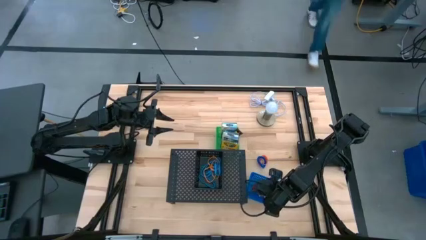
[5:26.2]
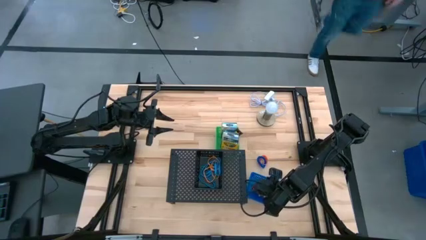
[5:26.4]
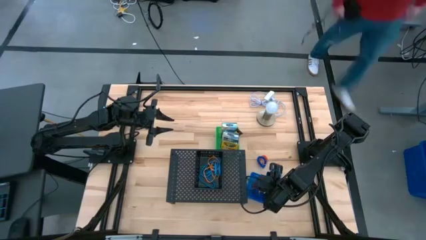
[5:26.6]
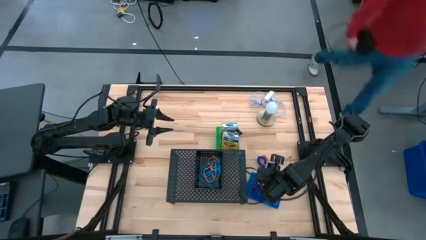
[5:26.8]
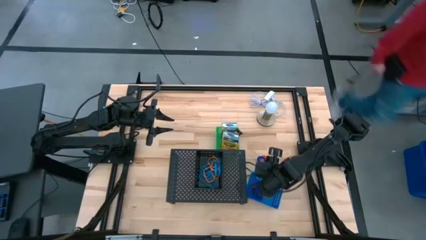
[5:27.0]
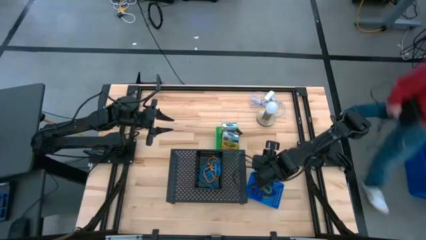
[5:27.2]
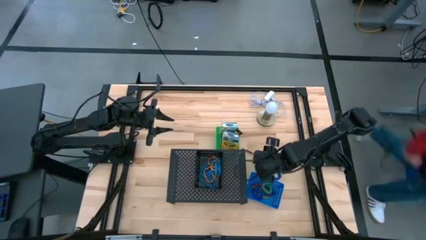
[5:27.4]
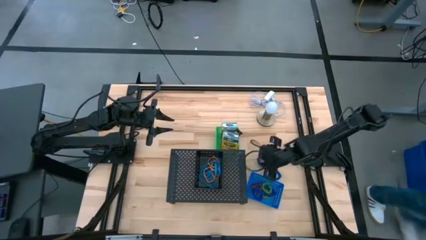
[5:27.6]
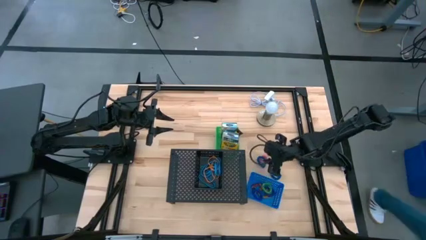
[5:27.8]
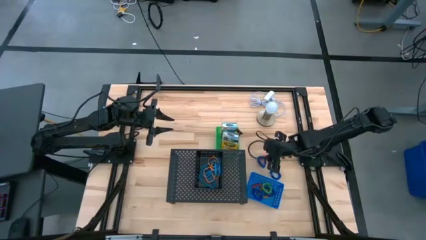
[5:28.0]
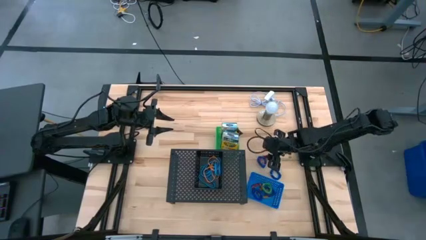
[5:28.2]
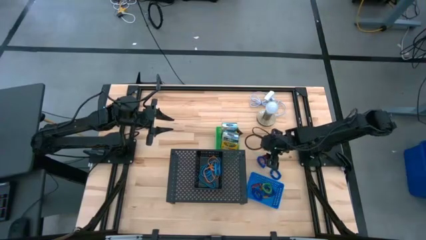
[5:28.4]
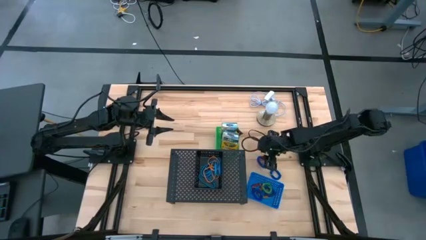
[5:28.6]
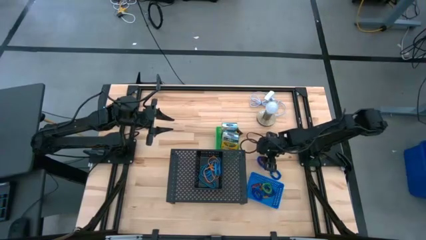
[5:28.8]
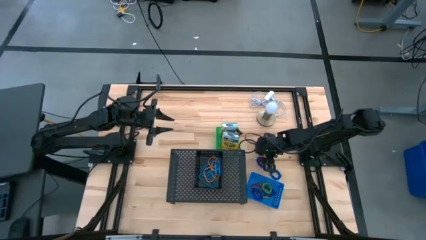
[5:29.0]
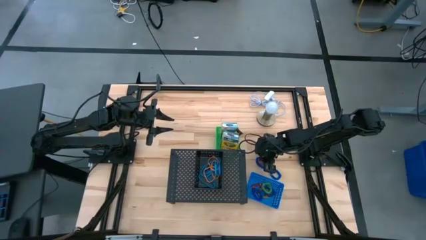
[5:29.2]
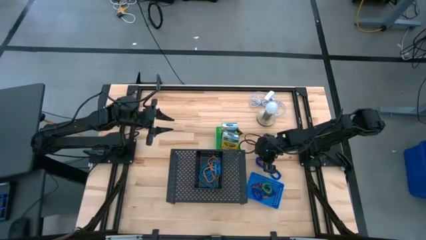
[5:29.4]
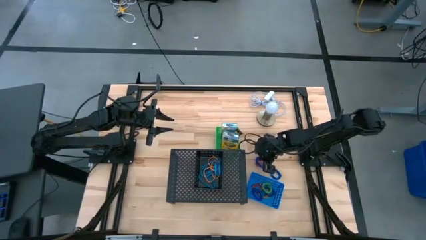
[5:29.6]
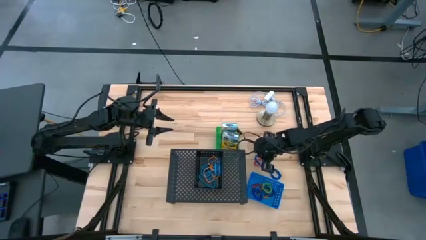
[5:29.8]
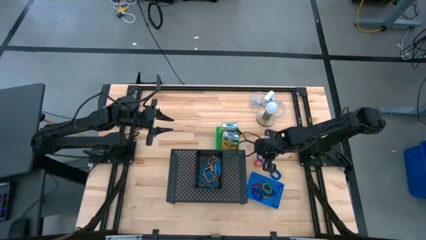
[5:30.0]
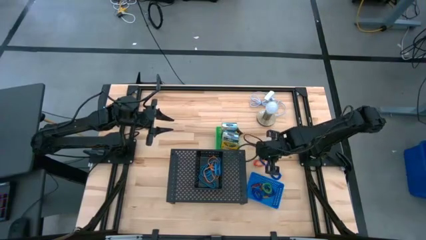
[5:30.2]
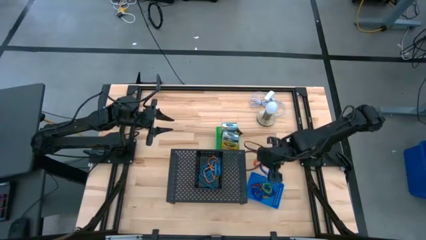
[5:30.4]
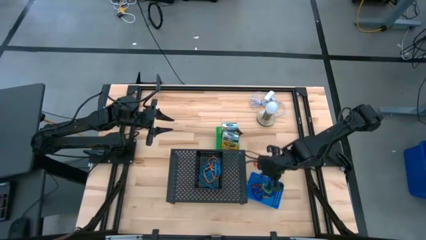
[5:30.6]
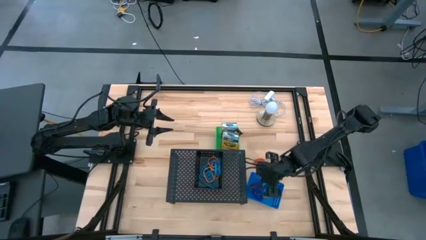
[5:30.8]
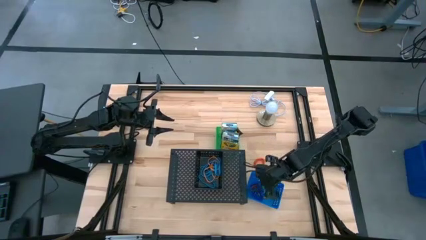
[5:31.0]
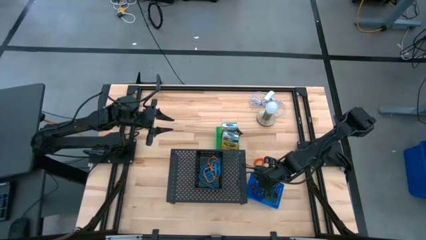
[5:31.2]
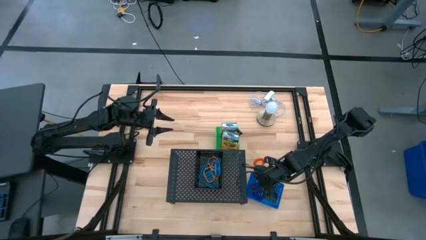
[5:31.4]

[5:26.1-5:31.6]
Task: Pick & Place Office Desk Supplies
Put the top blue spring keychain into the blue bin

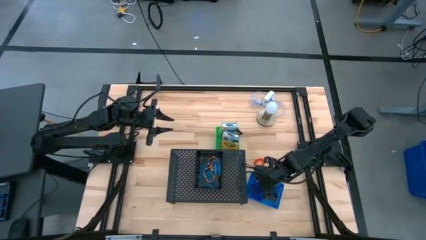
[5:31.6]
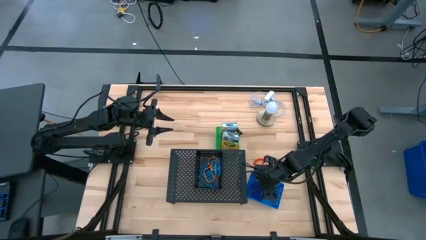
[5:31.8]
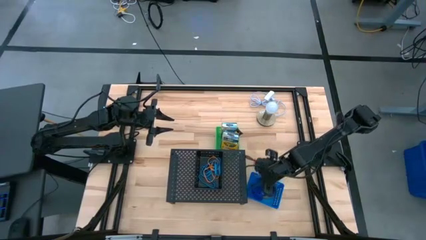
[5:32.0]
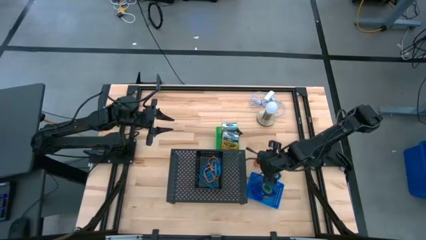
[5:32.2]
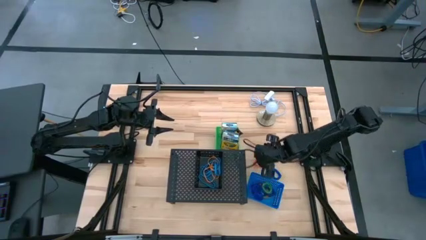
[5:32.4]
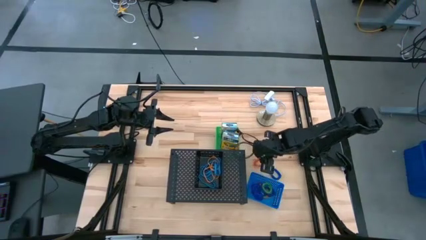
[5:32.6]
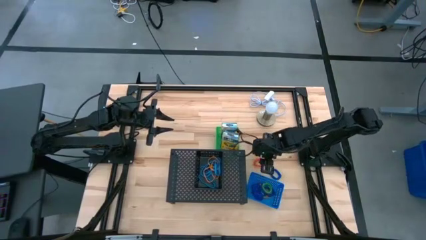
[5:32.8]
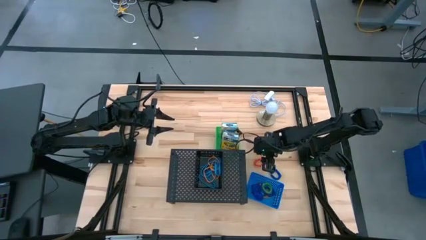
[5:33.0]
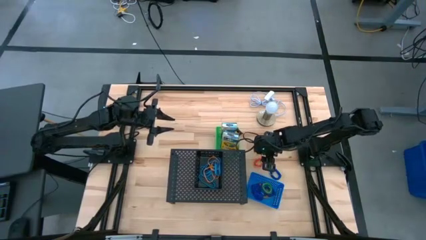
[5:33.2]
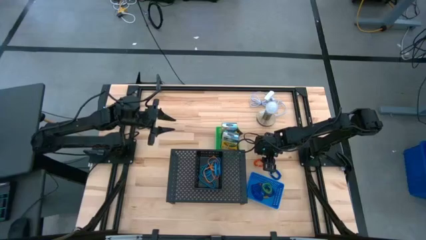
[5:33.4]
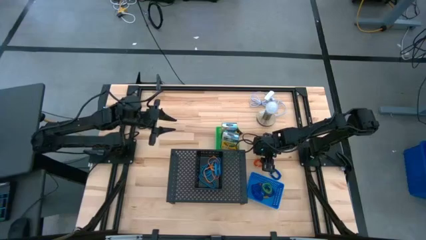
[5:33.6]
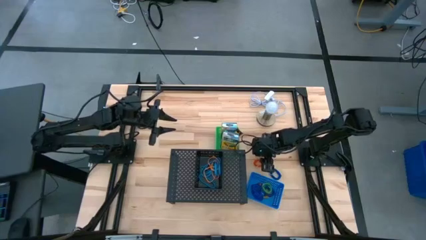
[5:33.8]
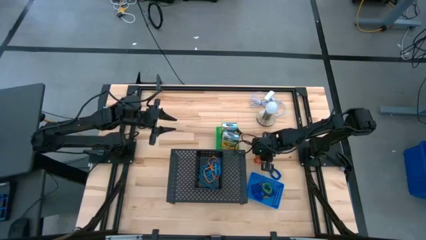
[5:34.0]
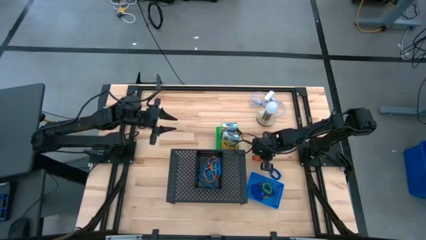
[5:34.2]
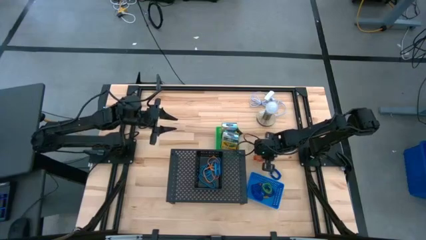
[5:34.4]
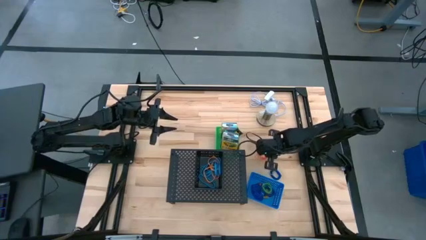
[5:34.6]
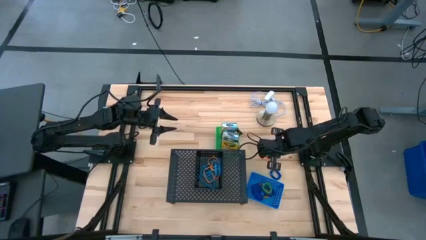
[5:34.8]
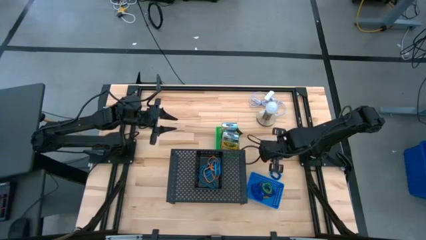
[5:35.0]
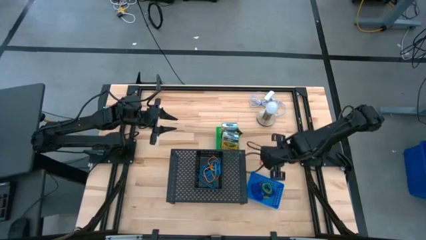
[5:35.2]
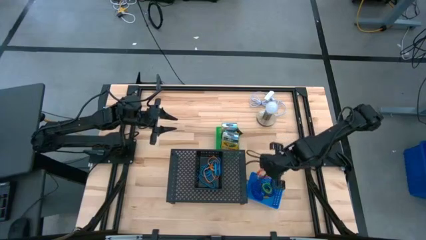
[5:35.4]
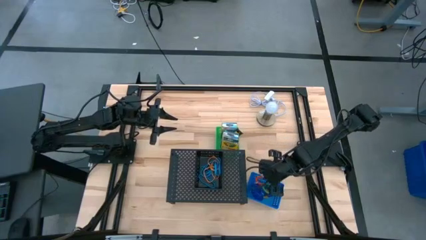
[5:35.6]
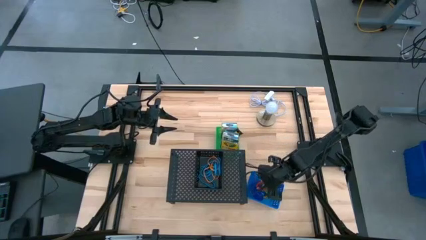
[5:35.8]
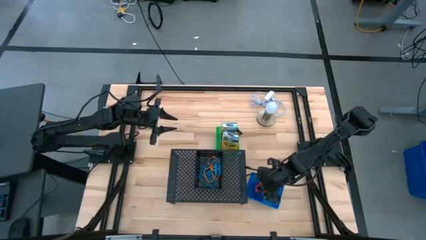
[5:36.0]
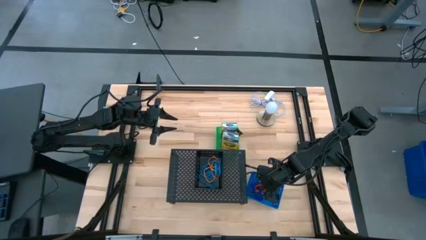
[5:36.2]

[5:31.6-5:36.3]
Put the orange spring keychain into the blue bin

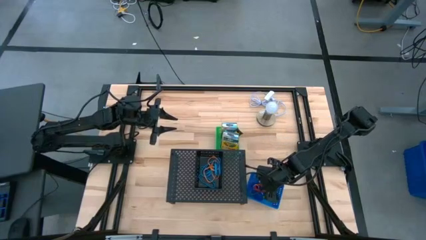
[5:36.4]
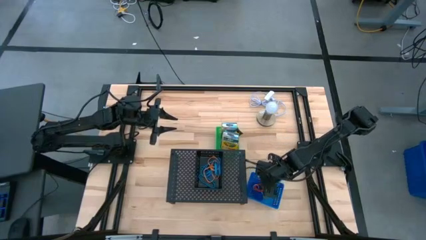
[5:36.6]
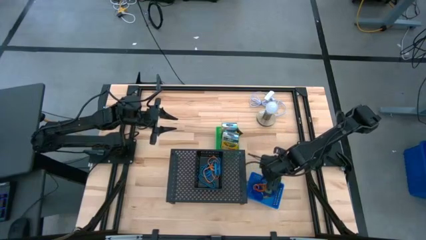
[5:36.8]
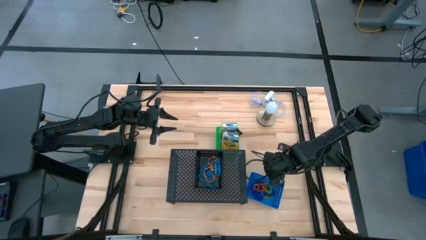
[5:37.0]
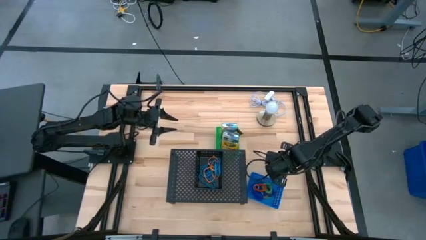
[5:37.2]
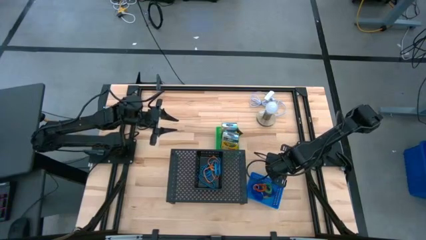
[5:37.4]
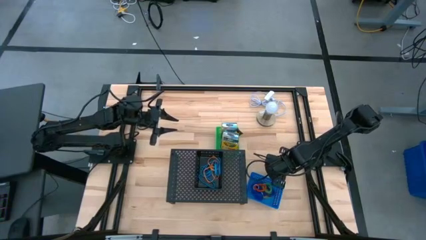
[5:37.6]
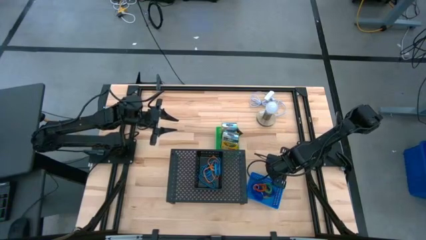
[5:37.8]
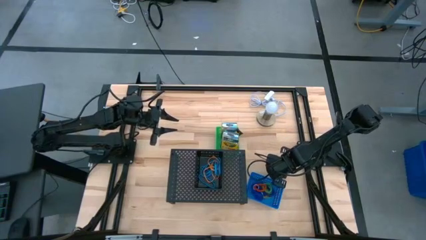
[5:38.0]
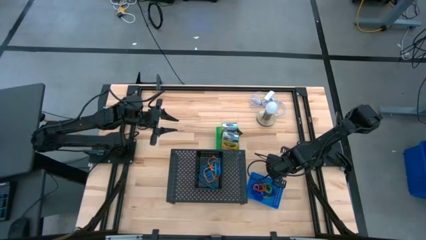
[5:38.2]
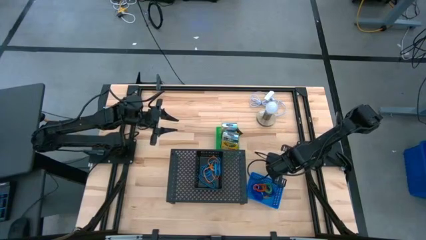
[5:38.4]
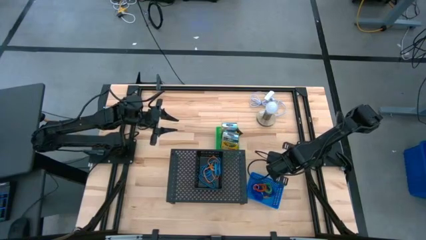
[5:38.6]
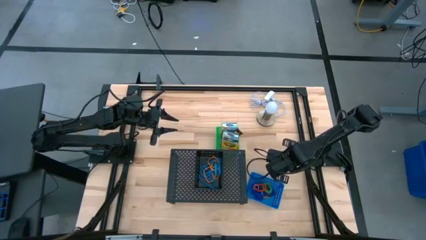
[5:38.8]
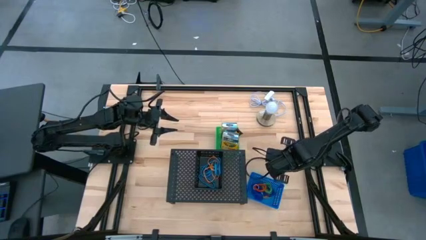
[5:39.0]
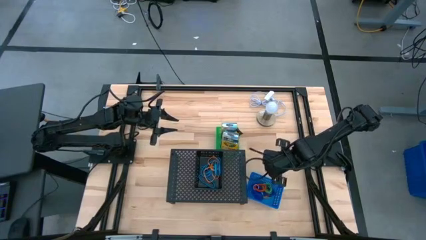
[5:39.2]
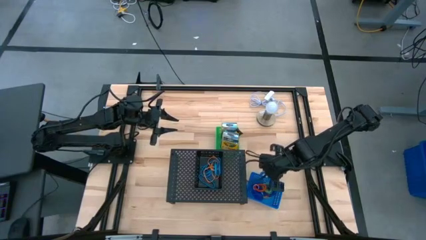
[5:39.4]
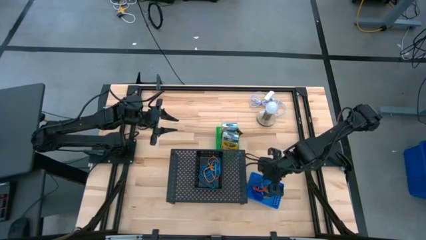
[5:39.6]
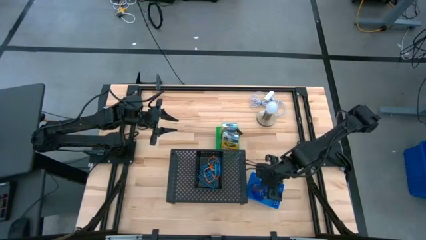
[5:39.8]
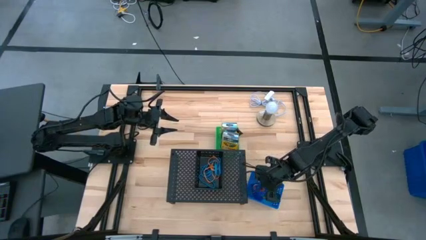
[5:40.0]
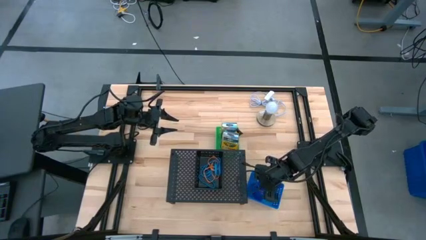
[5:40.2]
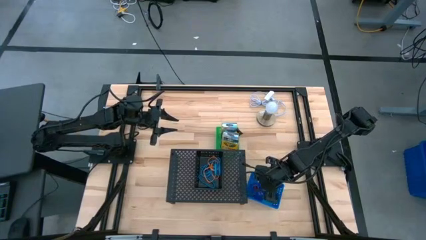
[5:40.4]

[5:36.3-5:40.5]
Put the blue spring keychain into the blue bin

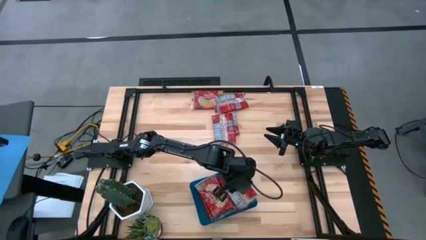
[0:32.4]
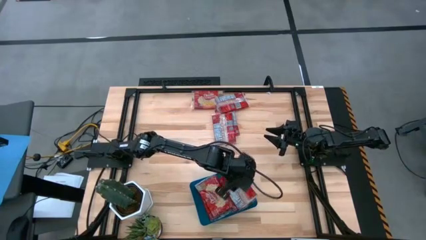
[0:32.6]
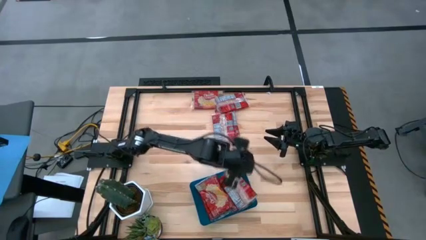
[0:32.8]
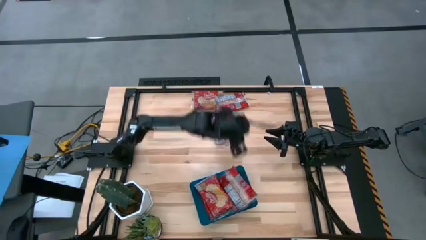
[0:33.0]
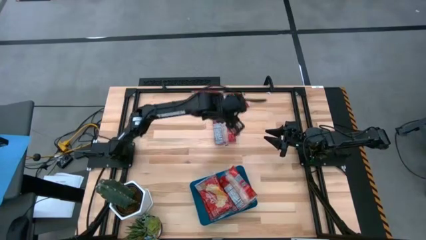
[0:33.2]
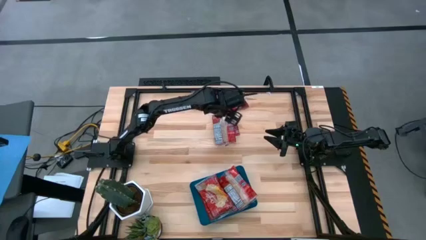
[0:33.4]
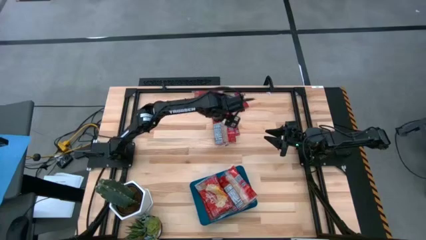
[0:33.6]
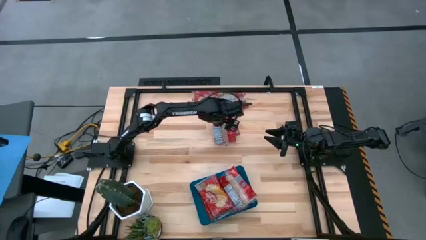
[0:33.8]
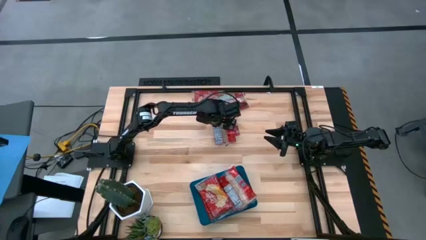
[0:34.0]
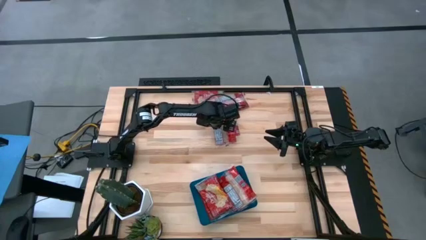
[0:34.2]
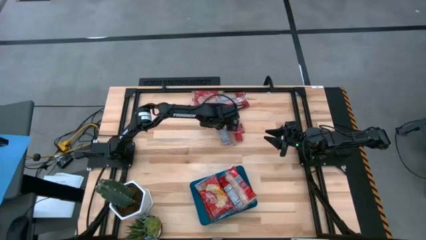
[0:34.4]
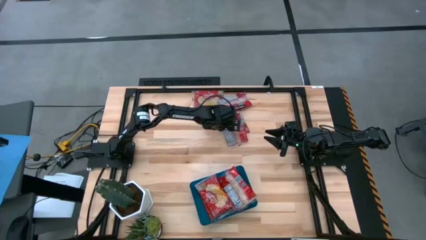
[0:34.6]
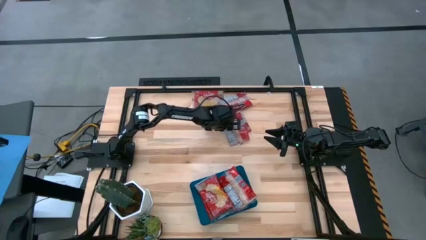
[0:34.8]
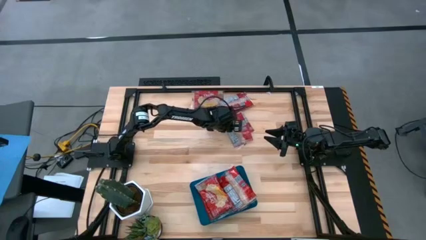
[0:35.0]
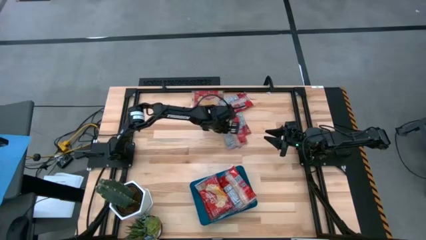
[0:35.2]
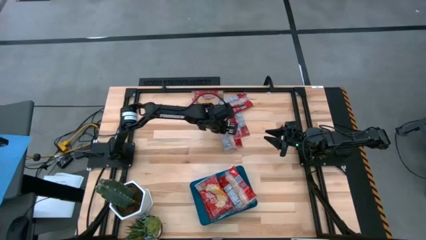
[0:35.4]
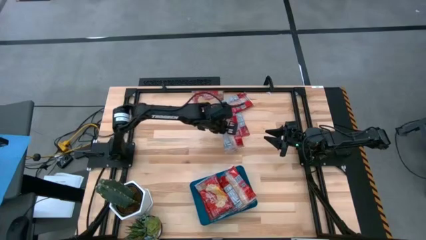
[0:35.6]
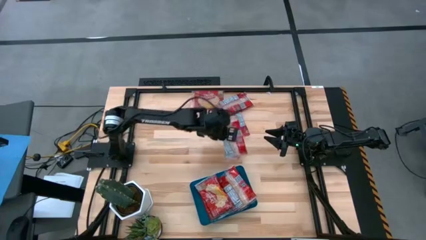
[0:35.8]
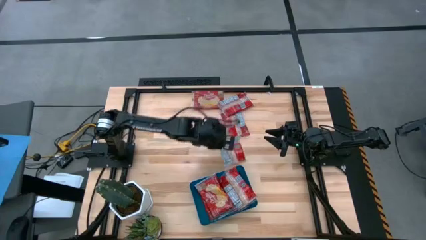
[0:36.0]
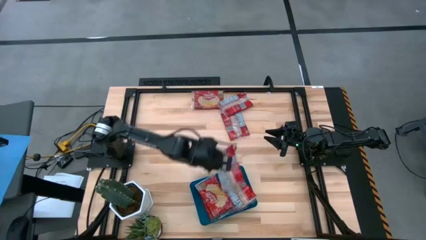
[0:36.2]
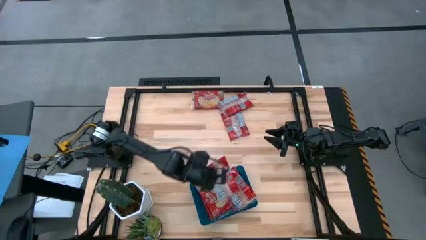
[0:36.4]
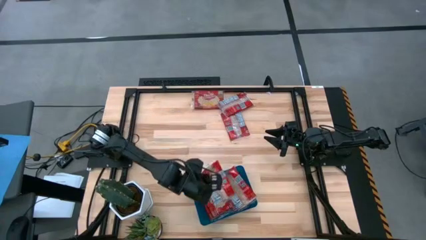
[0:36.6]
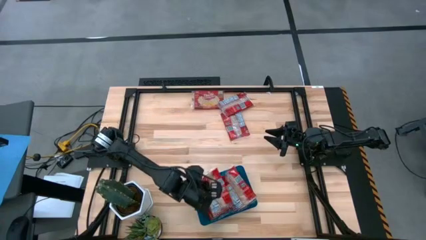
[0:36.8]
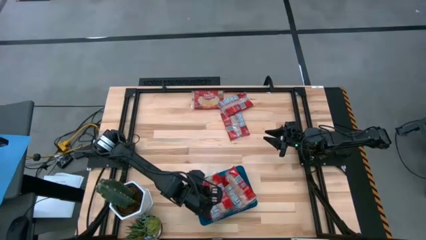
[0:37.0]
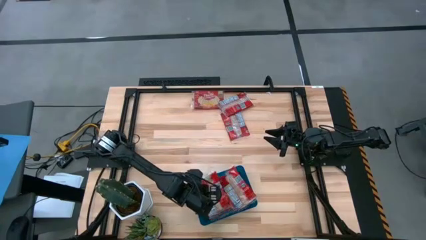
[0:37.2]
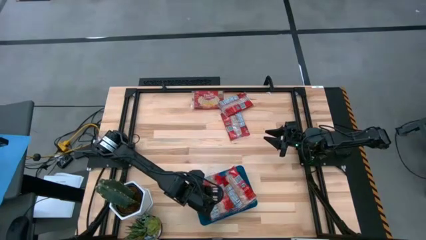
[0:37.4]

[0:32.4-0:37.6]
Task: Sort popcorn bags into baskets
Put the popcorn bag into the blue bin
